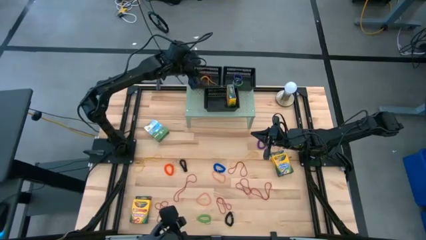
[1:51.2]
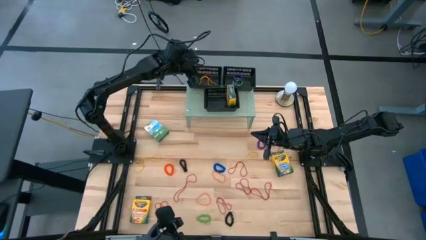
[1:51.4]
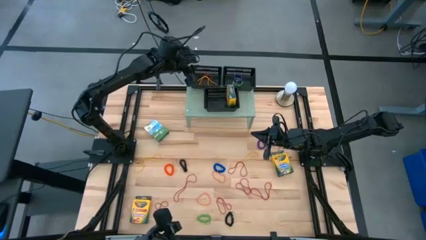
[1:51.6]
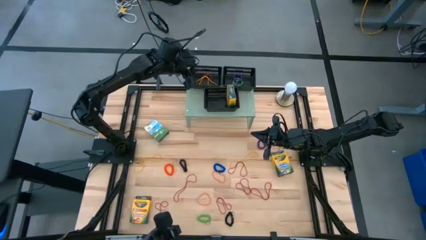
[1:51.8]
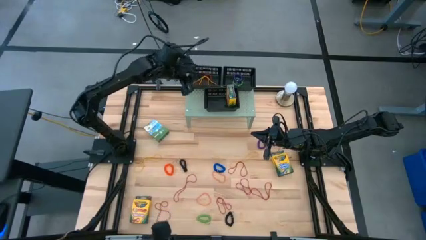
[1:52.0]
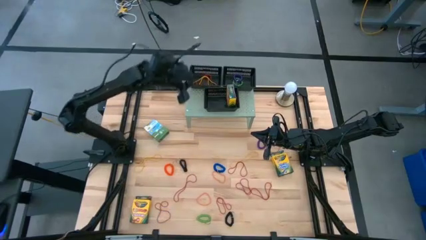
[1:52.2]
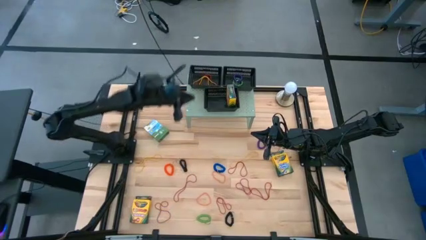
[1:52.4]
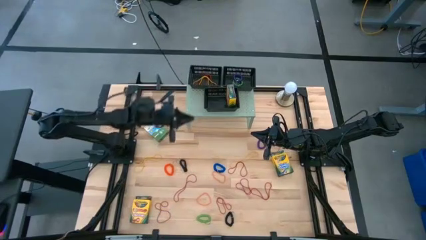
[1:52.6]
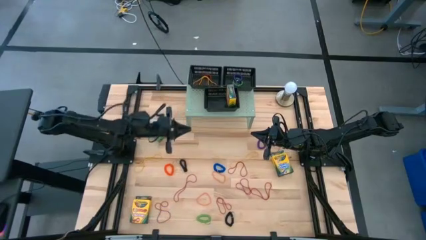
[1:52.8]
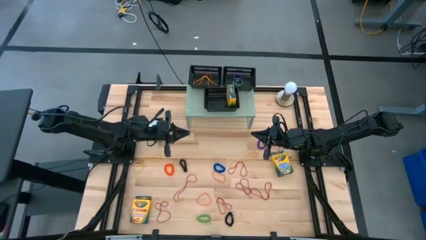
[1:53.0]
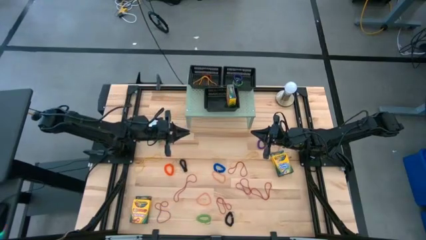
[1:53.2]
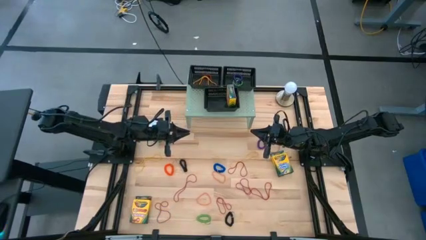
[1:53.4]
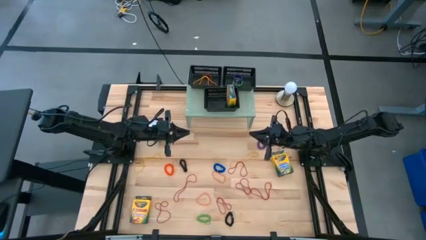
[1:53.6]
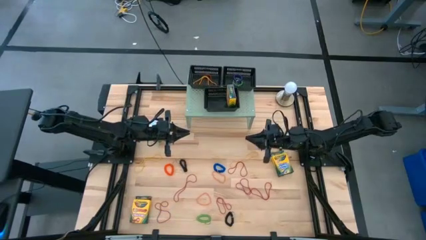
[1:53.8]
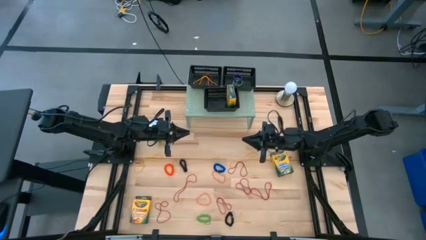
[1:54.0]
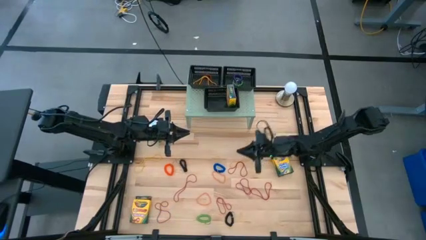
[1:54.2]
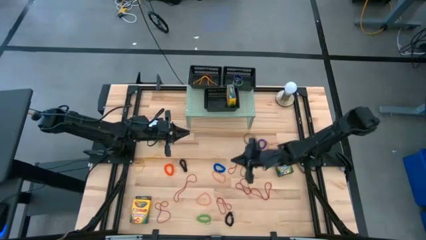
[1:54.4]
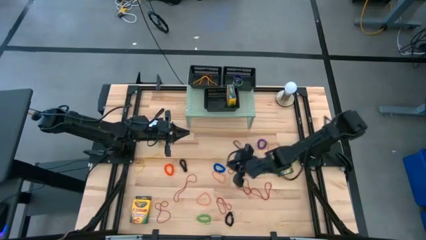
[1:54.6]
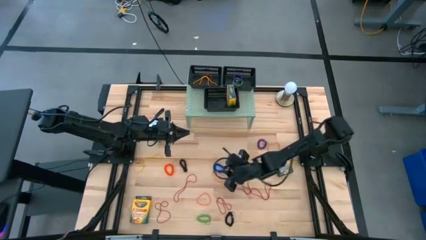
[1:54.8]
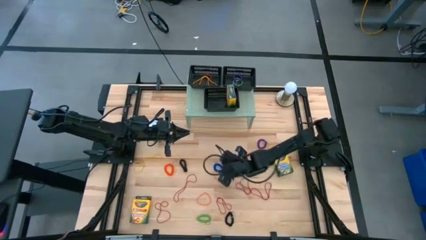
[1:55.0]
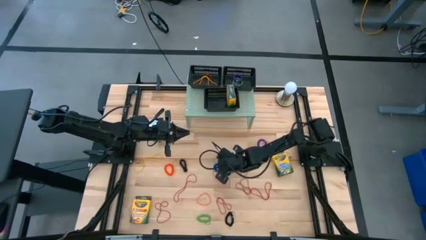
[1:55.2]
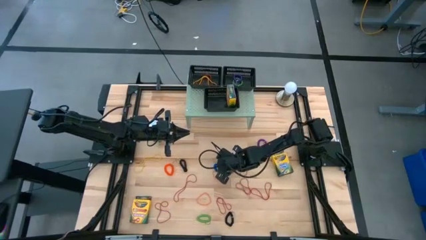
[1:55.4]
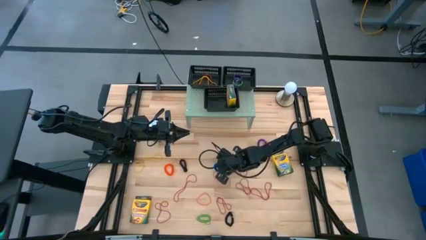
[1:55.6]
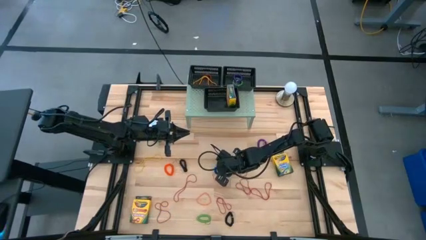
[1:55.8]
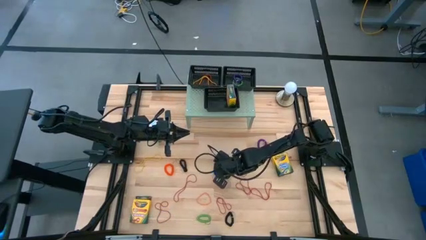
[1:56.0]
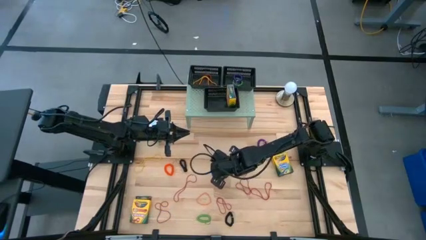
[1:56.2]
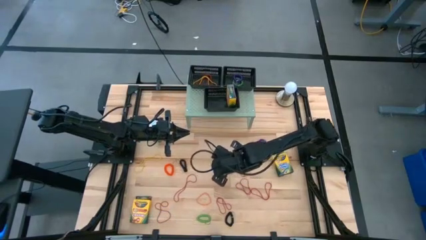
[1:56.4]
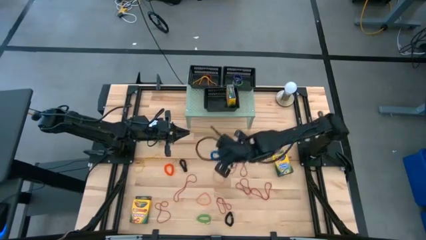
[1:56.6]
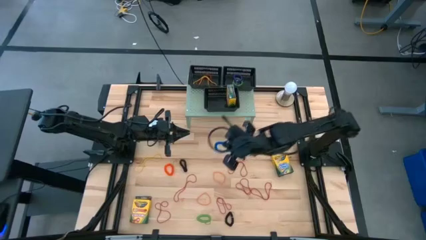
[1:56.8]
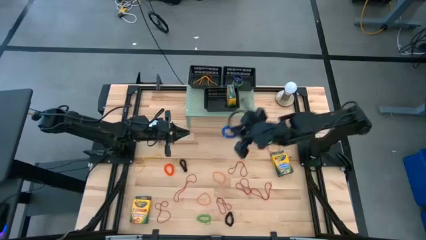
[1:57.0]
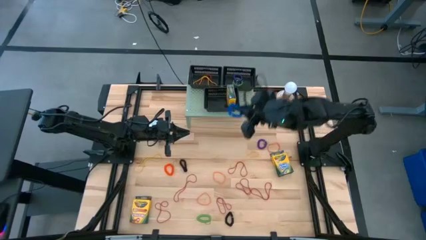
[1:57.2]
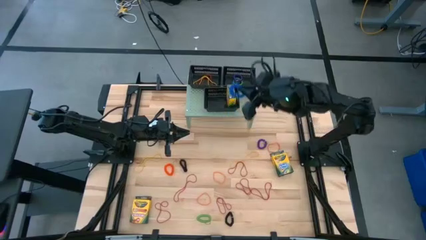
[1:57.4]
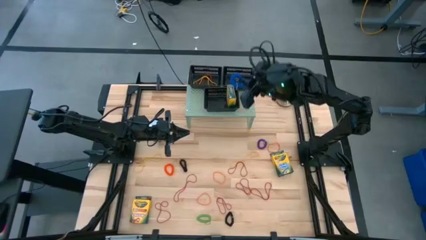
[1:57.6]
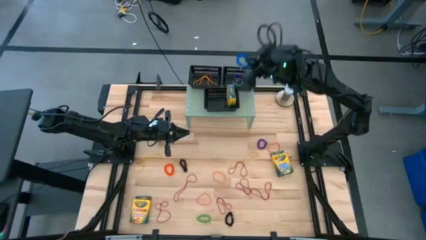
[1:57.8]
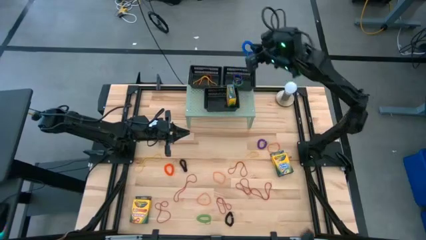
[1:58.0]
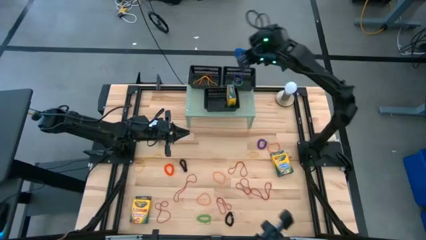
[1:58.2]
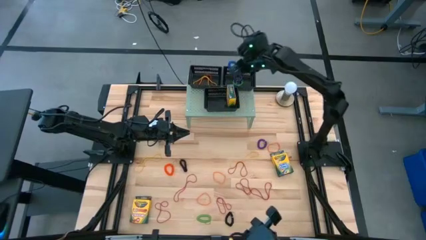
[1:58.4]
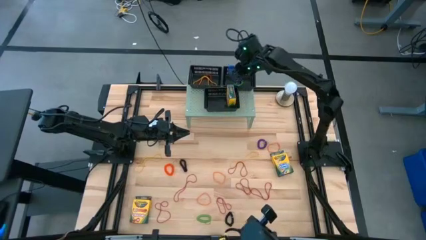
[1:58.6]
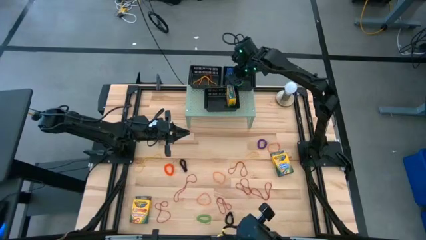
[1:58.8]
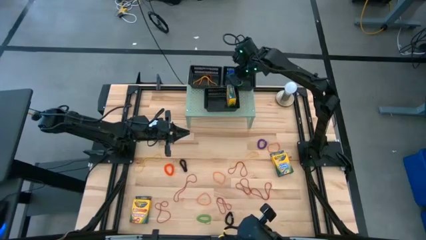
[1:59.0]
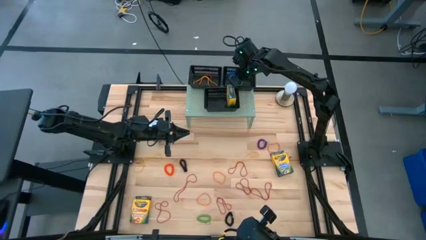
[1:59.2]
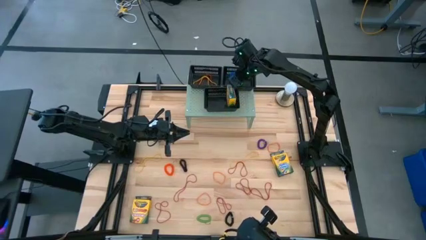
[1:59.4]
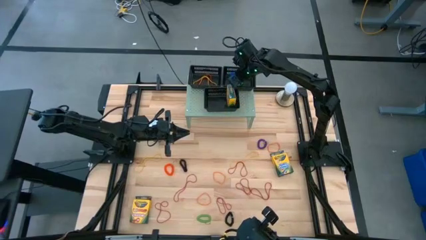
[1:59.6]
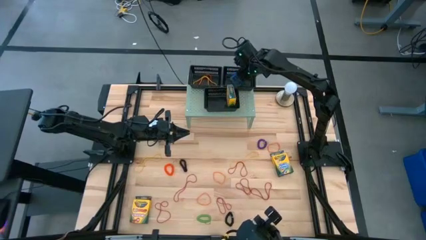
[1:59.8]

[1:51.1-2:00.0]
Task: Pick & Place Office Desk Supplies
Put the blue spiral keychain the top right black bin

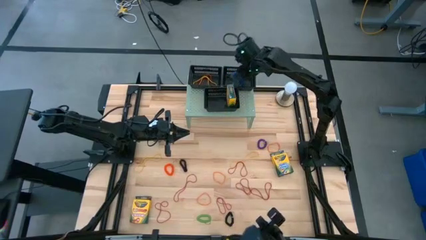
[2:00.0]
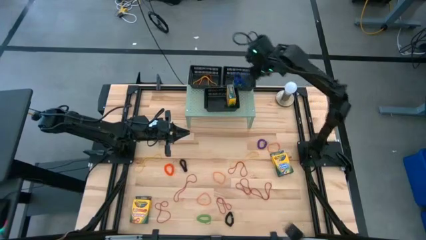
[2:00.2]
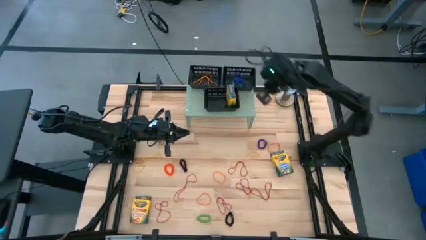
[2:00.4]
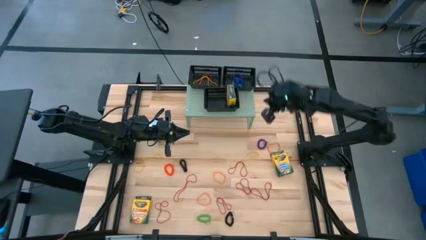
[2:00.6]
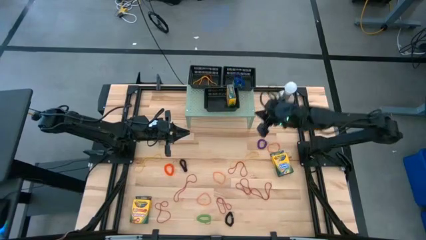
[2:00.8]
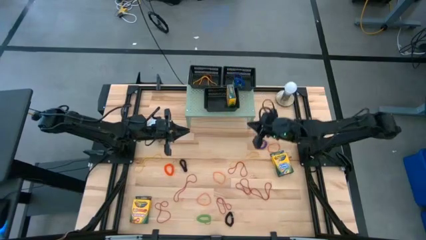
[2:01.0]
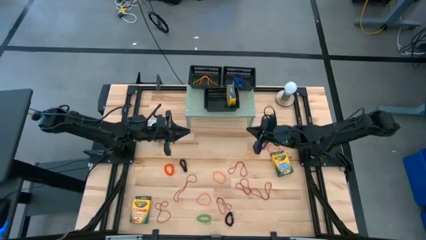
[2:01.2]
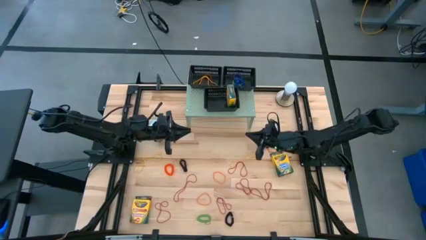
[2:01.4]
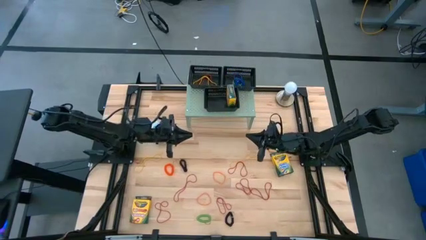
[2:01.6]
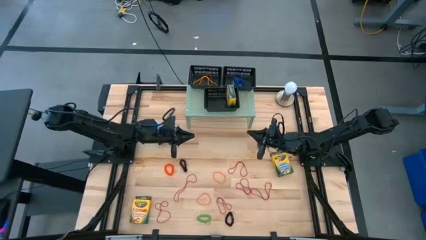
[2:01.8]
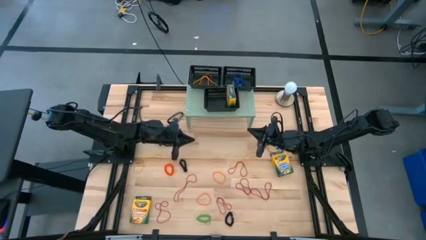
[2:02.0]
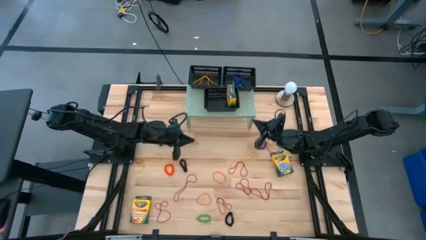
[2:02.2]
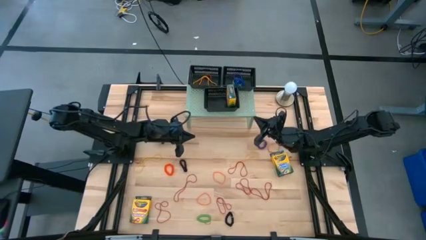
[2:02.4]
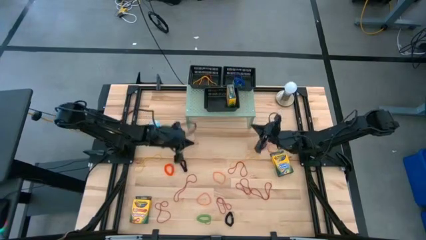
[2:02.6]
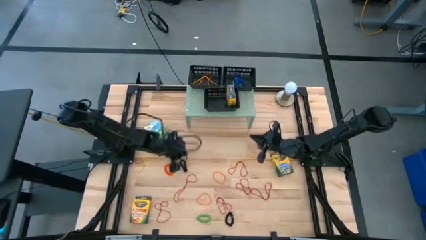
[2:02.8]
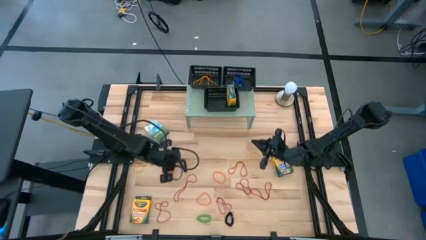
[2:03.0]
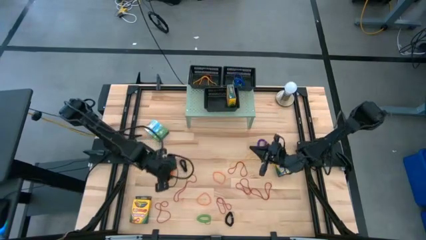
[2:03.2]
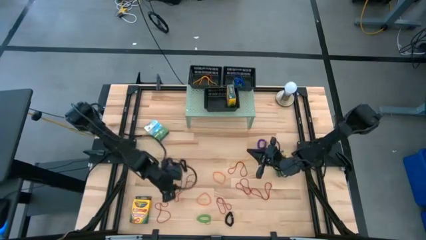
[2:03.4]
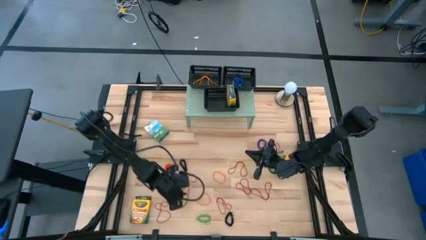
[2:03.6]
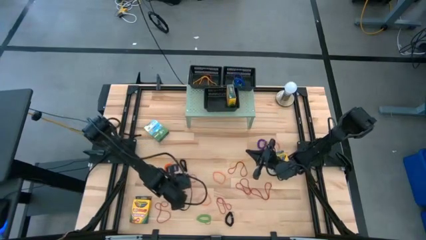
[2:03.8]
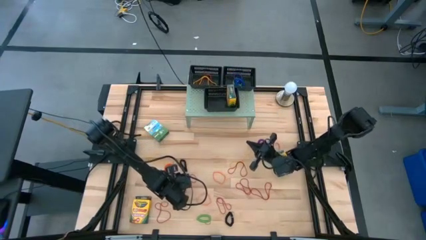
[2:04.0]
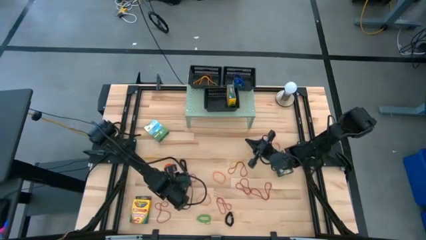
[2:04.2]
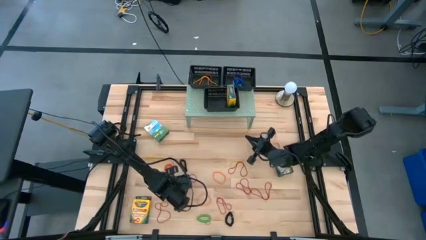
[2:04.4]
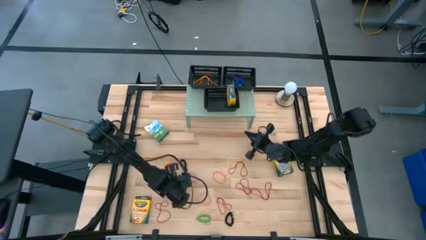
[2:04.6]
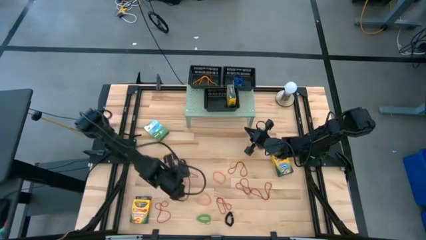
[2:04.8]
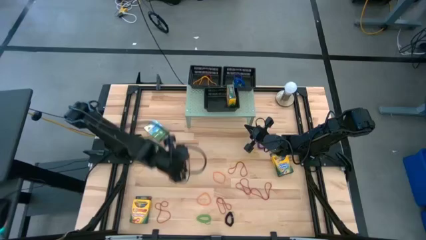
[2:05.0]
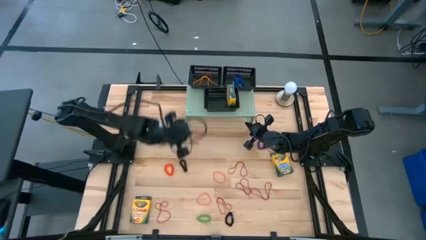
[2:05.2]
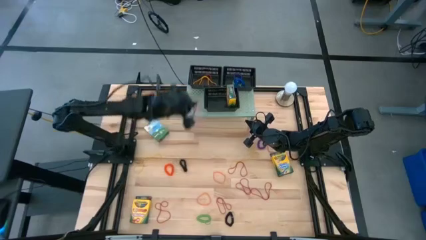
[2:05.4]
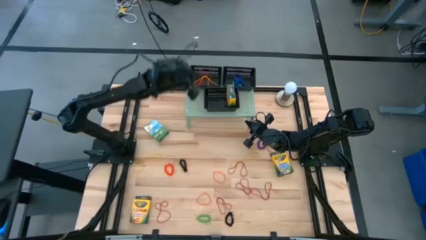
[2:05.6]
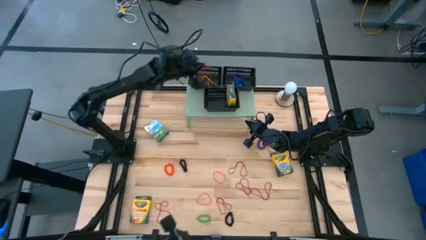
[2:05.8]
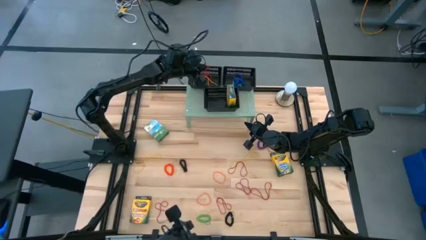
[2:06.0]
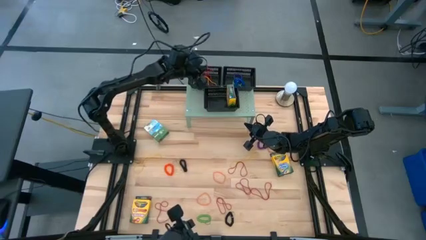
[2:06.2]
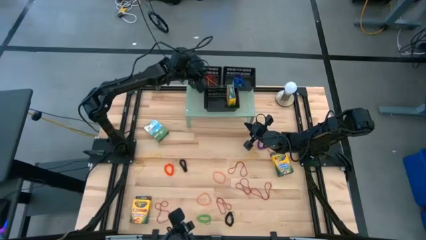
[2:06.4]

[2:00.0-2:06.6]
Put the red rubberband into the top left black bin
